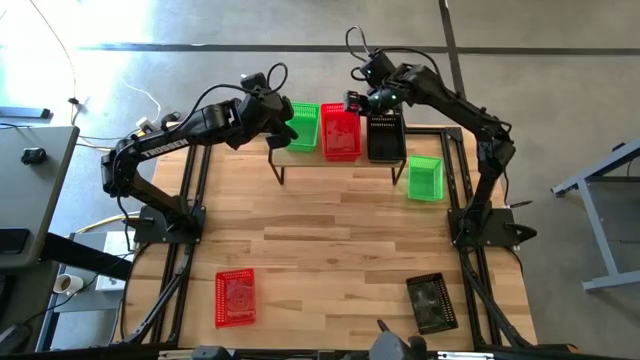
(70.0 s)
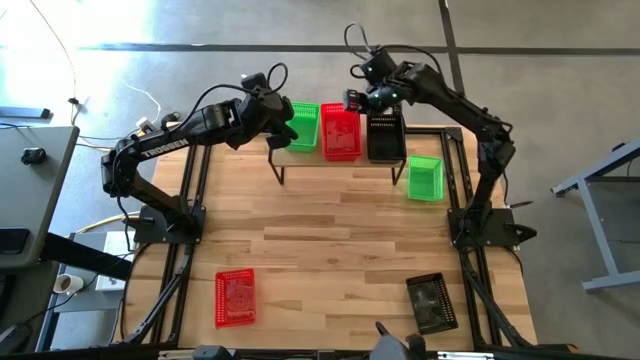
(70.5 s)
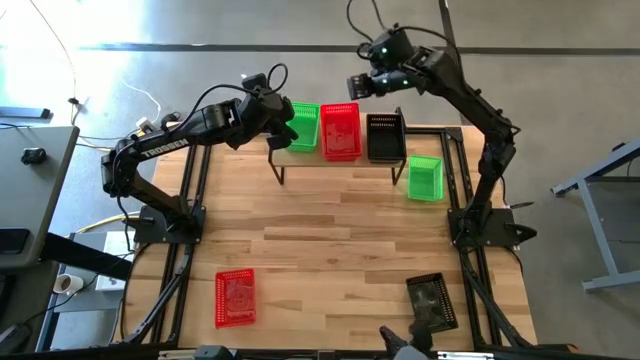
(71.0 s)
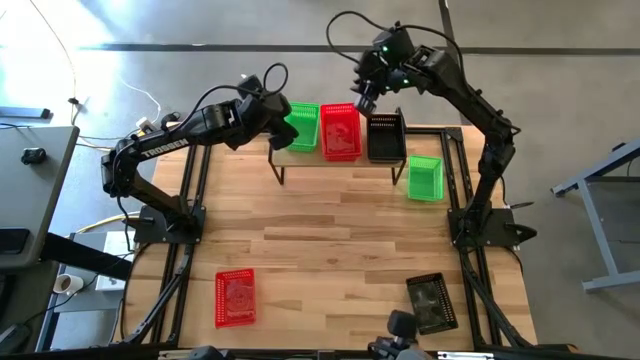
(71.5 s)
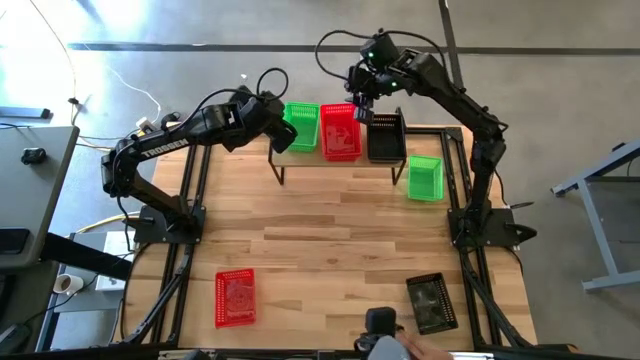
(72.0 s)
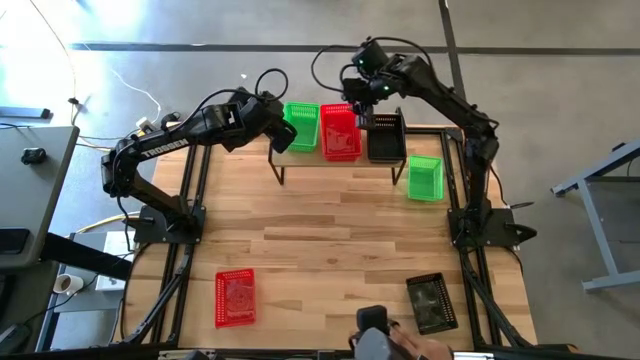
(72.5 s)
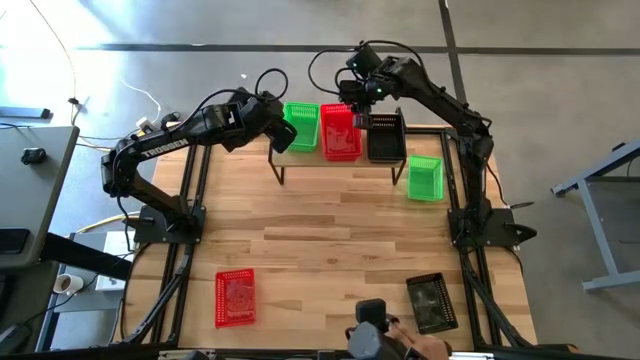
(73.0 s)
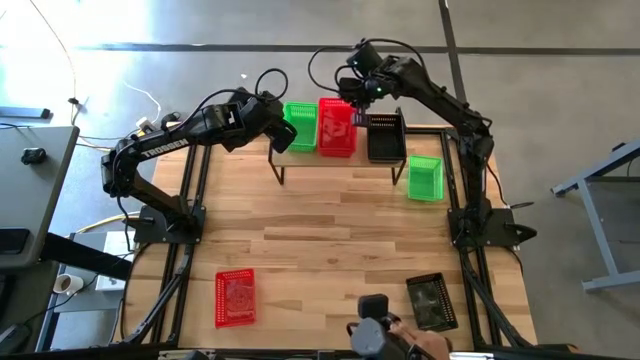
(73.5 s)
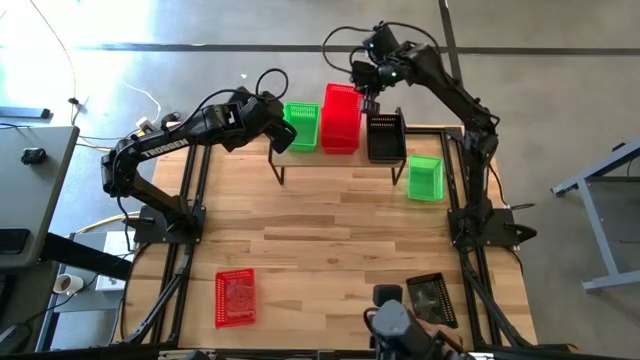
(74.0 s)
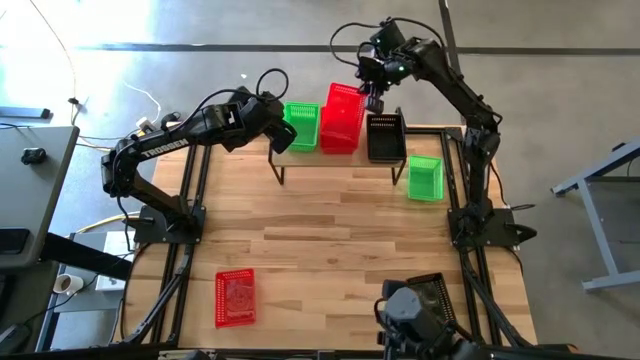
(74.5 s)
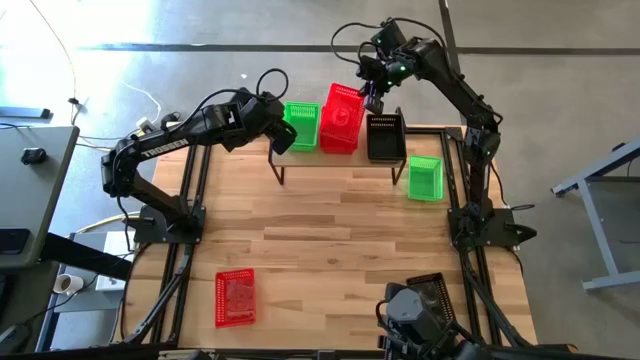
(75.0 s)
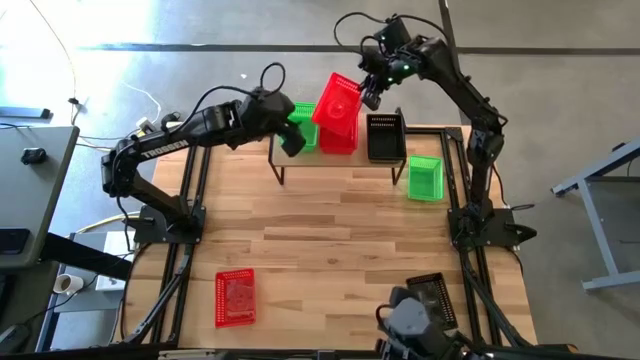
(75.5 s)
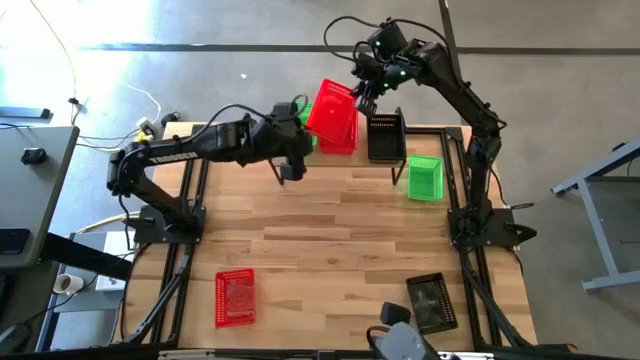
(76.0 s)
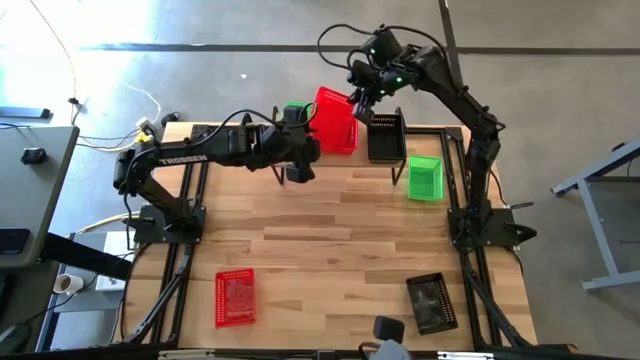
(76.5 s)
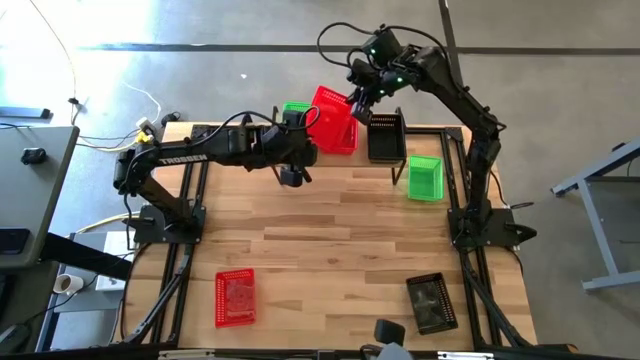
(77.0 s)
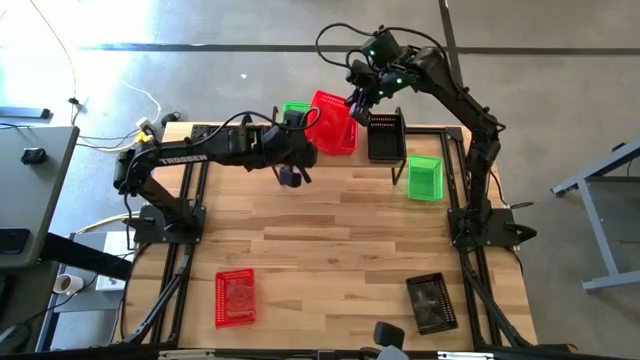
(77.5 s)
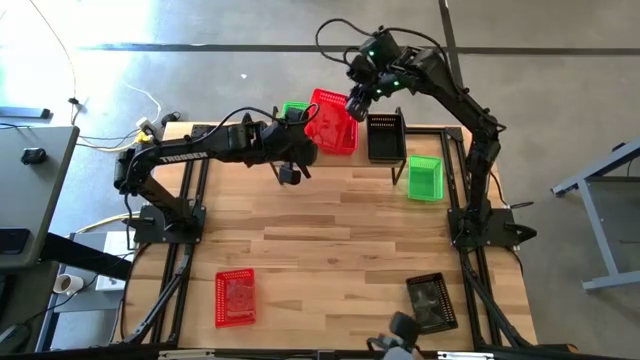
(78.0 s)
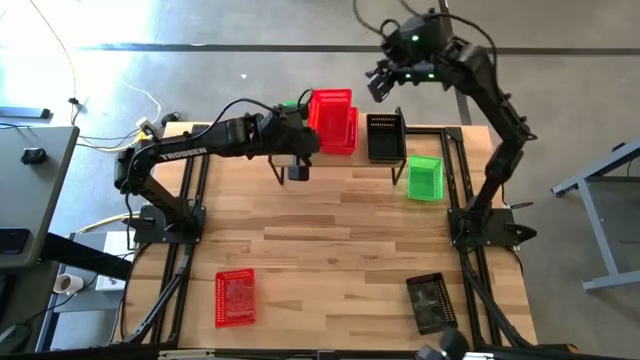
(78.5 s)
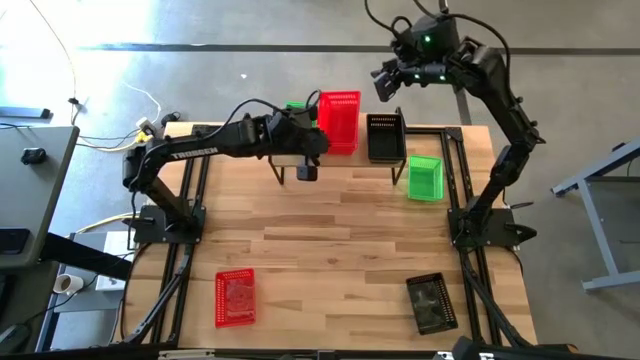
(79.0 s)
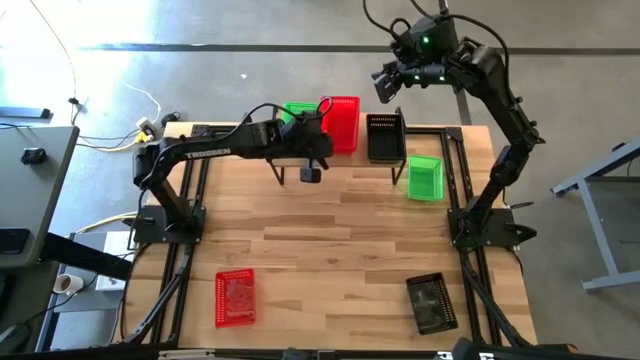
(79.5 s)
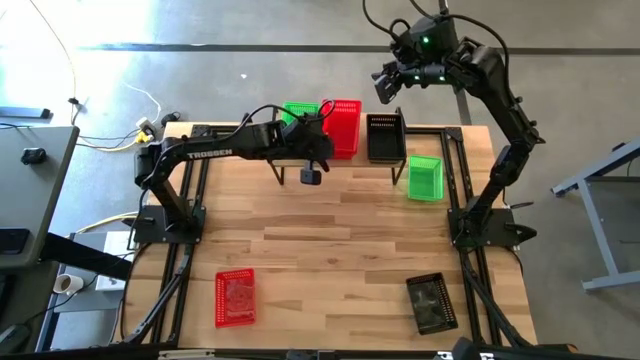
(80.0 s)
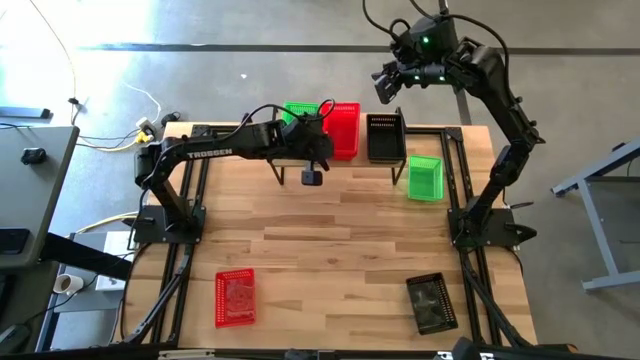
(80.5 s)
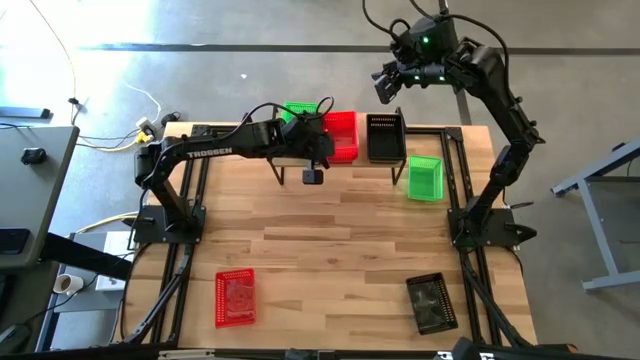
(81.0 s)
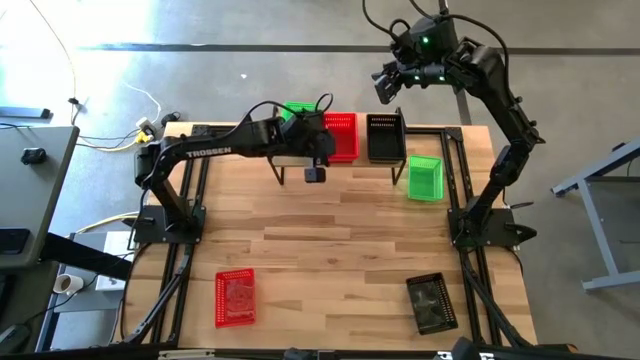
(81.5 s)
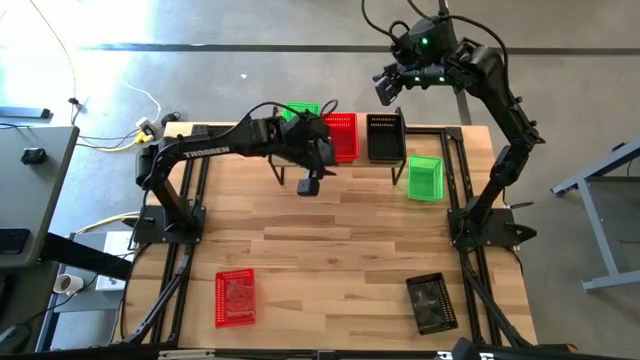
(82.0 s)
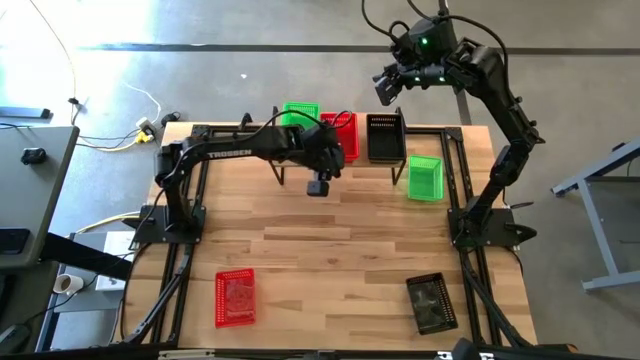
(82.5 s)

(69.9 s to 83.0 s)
Task: Stack baskets on shelf by color
Stack the top red bin on top of the red bin on the shelf

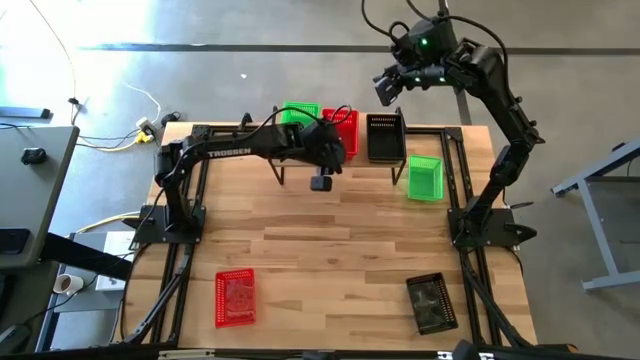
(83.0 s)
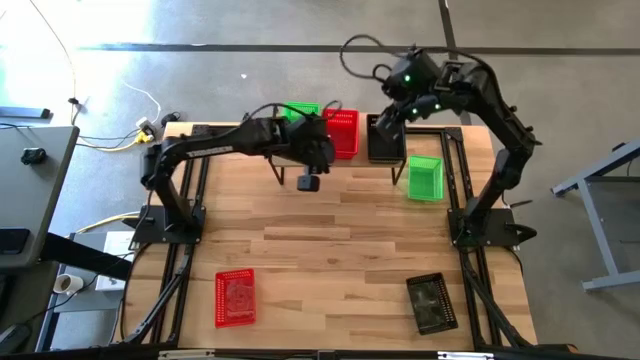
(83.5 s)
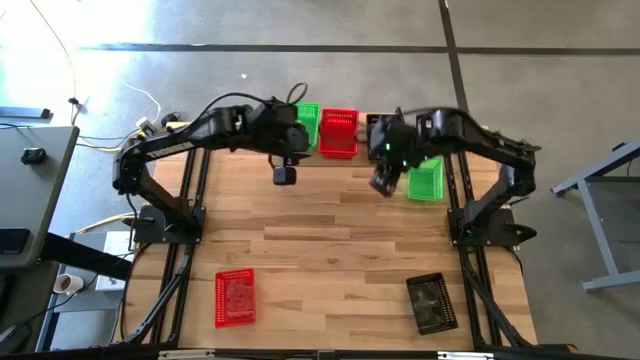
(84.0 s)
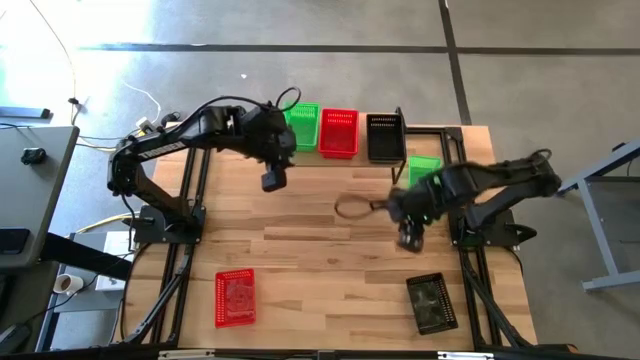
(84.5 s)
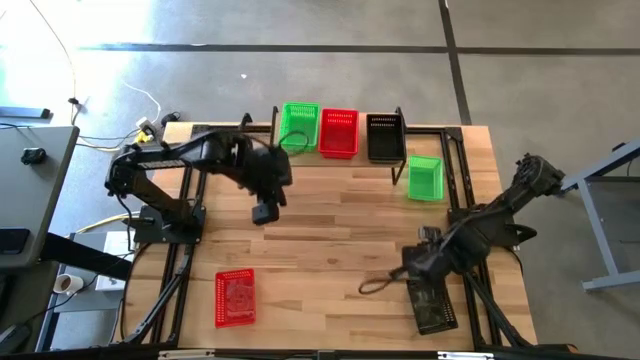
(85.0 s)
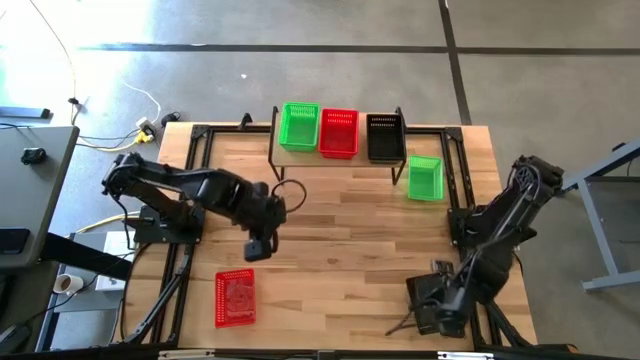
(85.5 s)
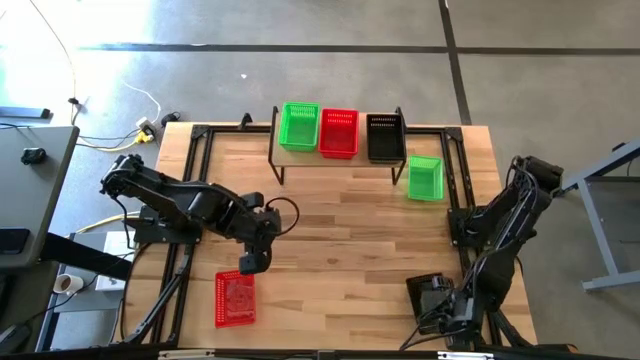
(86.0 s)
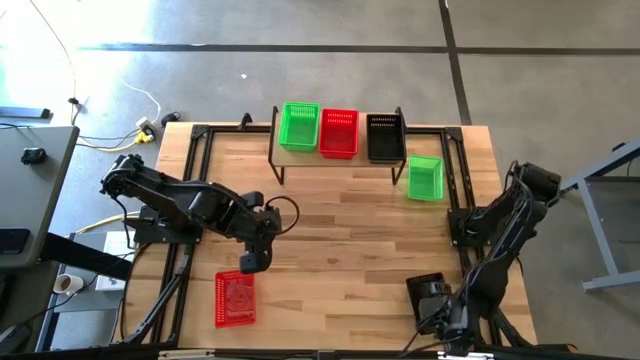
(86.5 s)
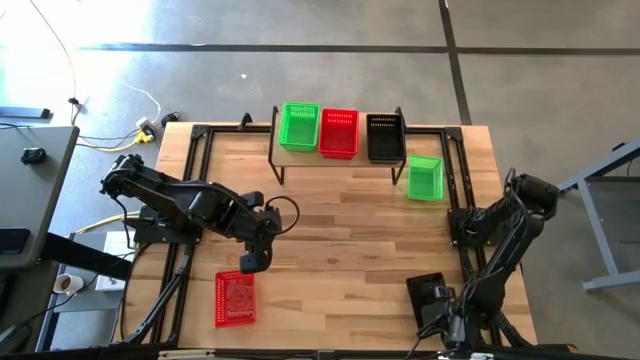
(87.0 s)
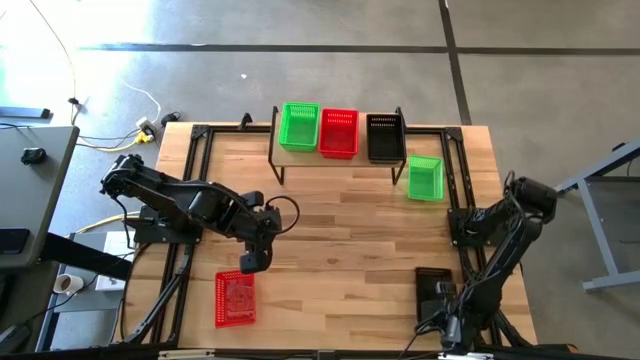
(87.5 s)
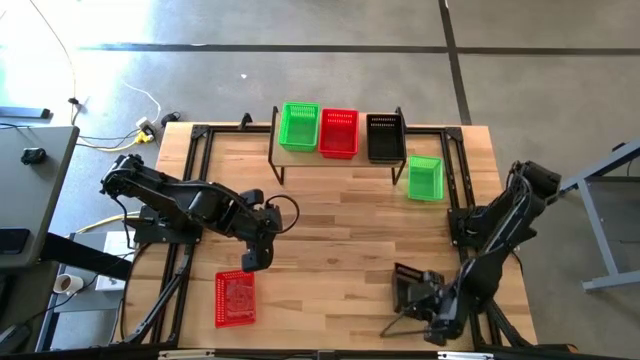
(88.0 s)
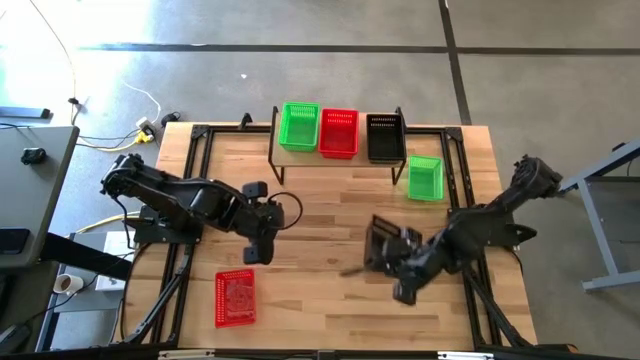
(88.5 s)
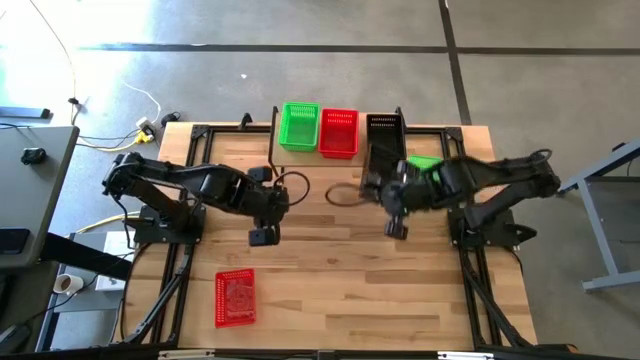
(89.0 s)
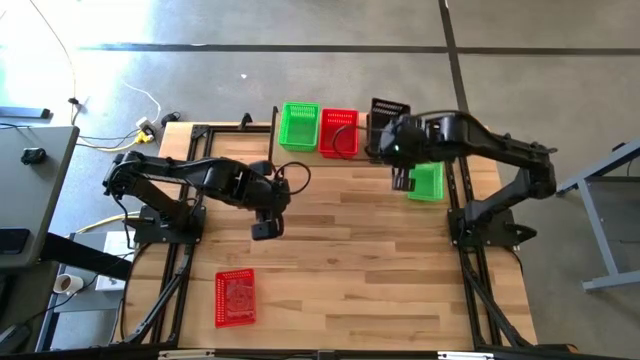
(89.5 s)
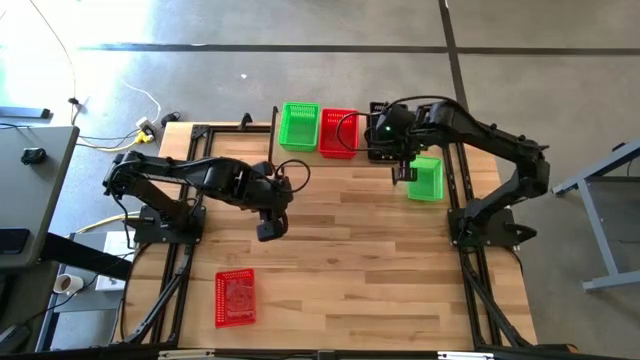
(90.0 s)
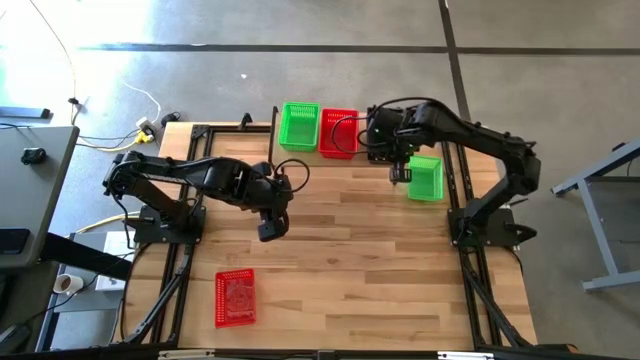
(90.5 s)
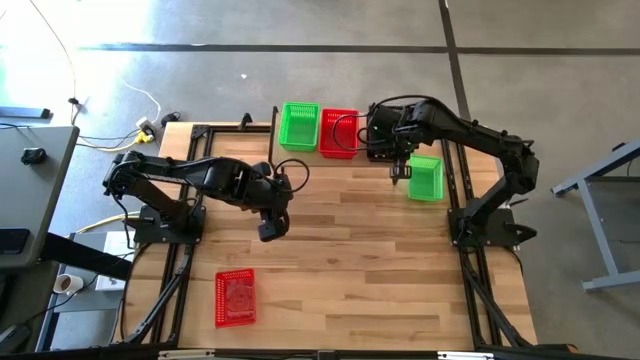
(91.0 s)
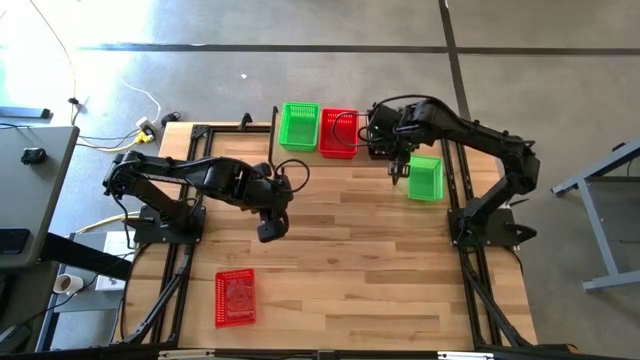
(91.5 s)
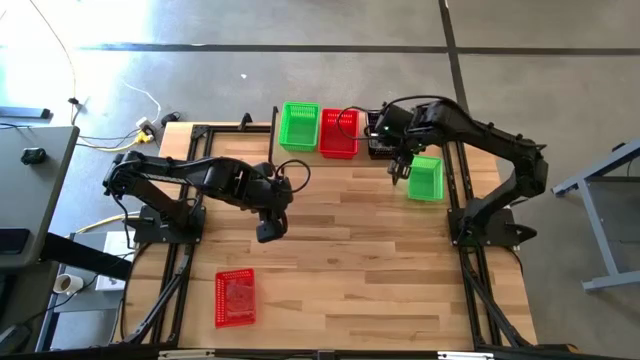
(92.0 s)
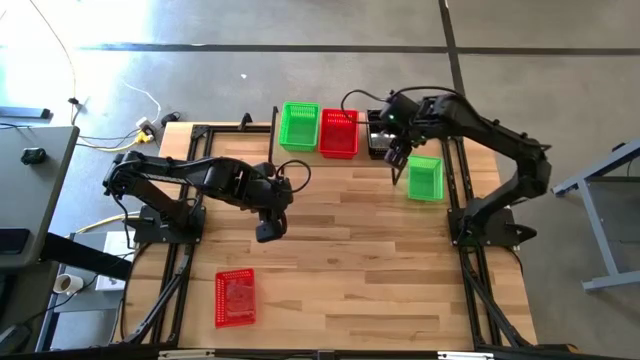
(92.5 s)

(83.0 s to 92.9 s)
Stack the black bin on top of the stacked black bins on the shelf
